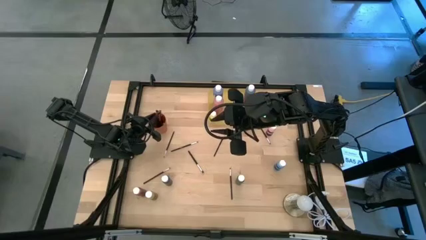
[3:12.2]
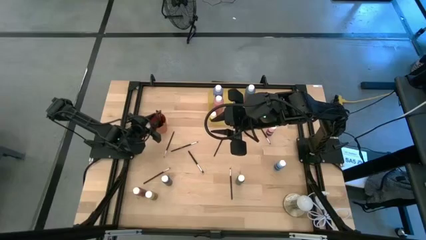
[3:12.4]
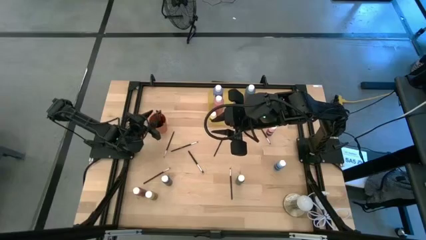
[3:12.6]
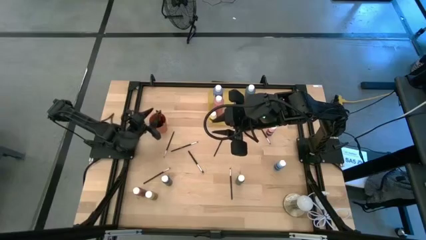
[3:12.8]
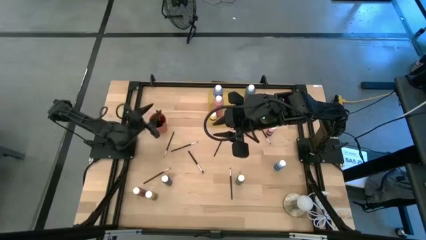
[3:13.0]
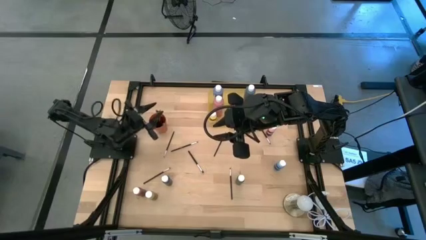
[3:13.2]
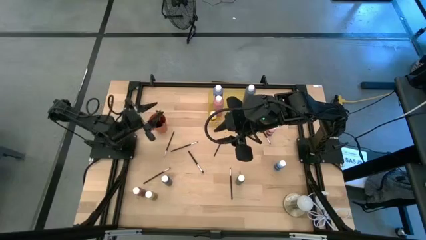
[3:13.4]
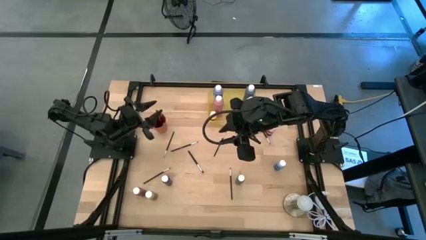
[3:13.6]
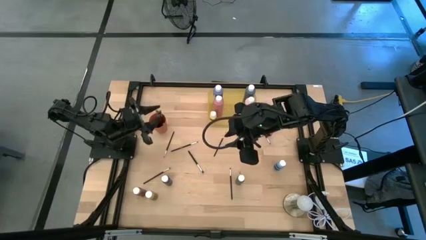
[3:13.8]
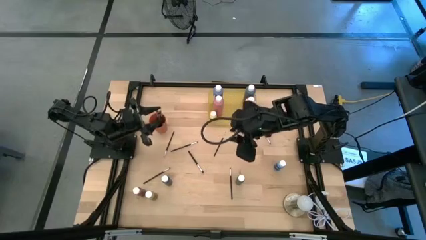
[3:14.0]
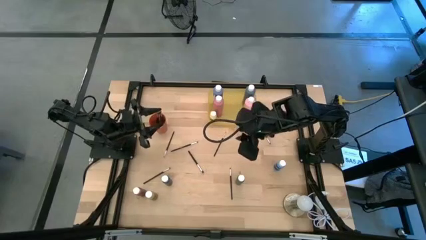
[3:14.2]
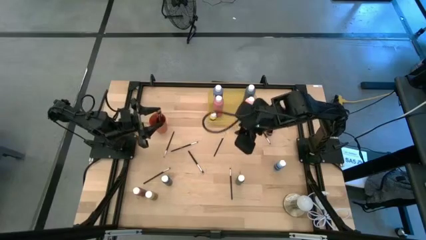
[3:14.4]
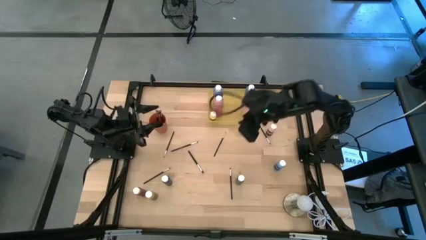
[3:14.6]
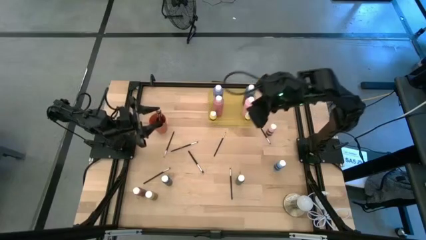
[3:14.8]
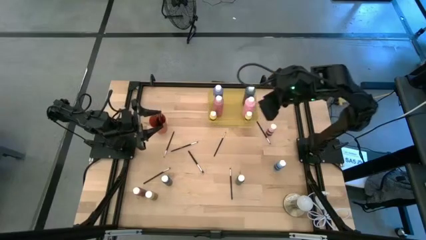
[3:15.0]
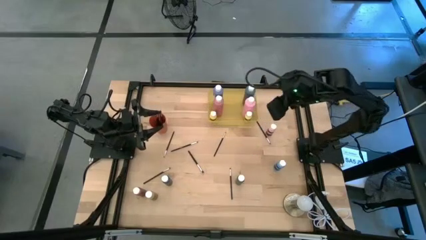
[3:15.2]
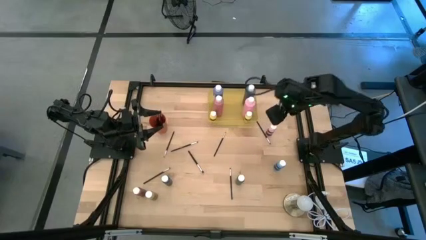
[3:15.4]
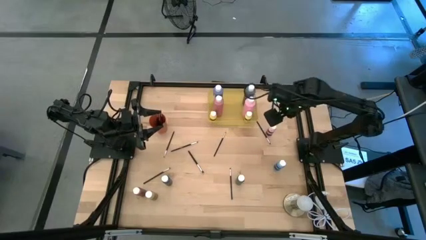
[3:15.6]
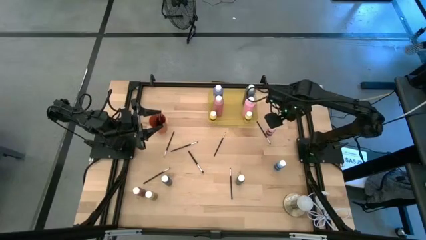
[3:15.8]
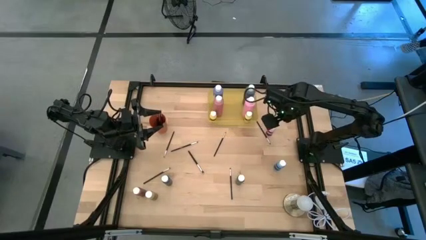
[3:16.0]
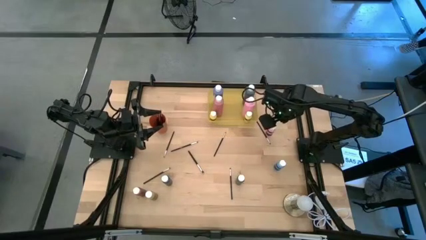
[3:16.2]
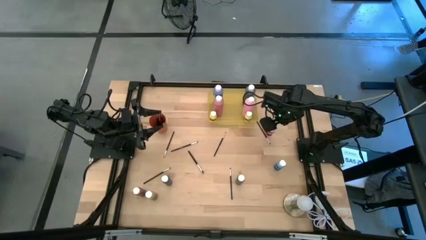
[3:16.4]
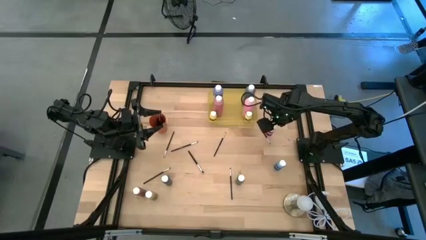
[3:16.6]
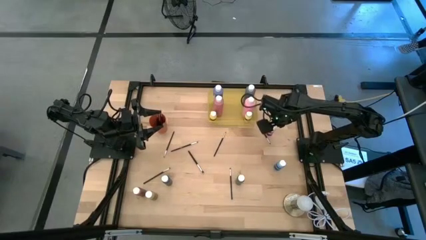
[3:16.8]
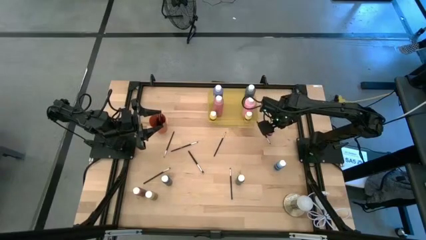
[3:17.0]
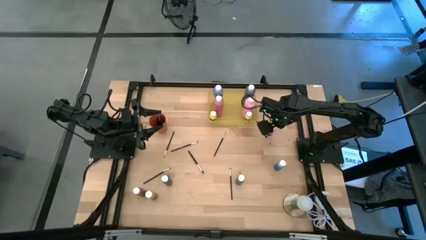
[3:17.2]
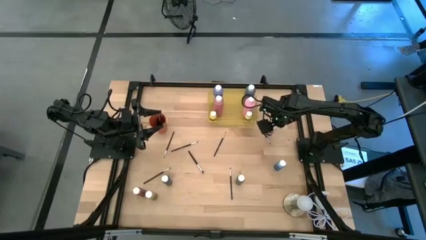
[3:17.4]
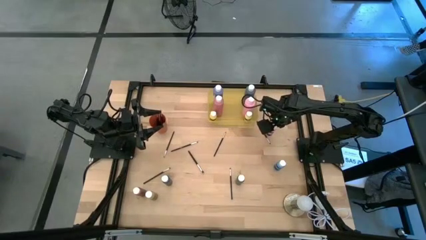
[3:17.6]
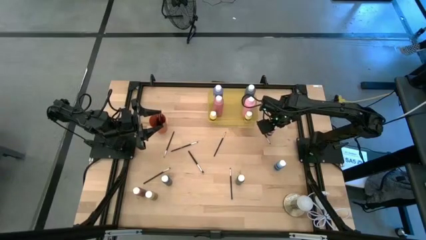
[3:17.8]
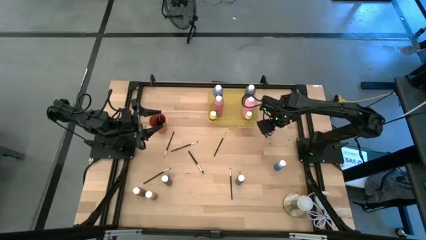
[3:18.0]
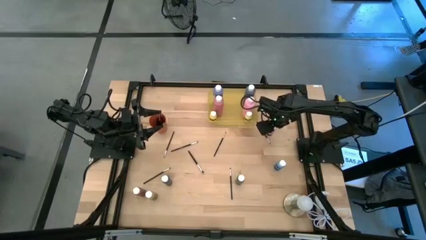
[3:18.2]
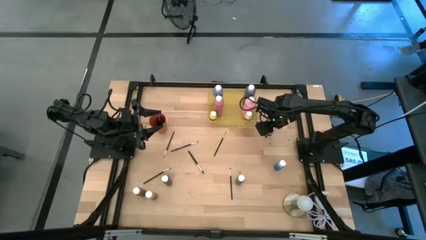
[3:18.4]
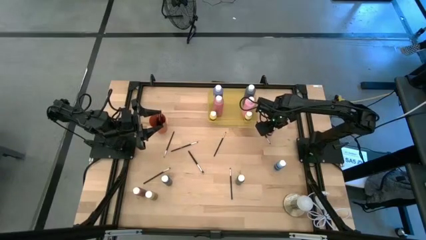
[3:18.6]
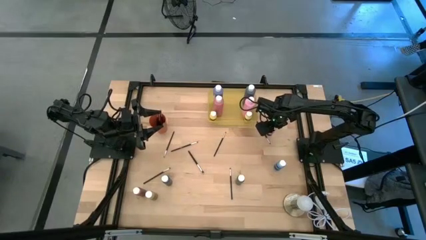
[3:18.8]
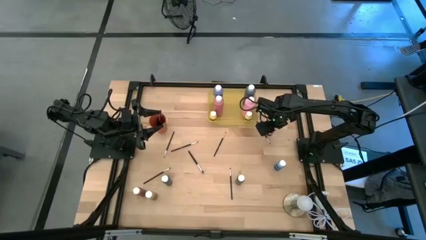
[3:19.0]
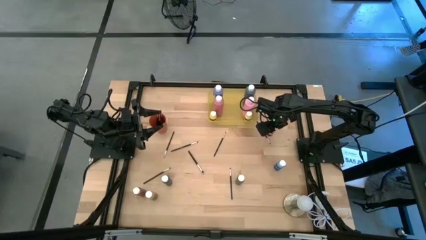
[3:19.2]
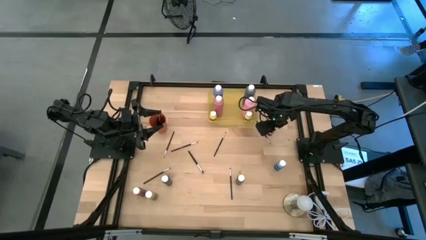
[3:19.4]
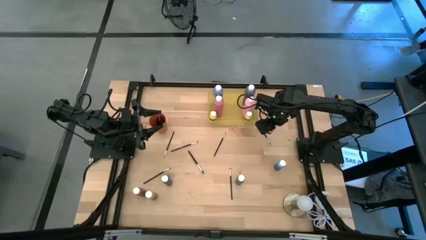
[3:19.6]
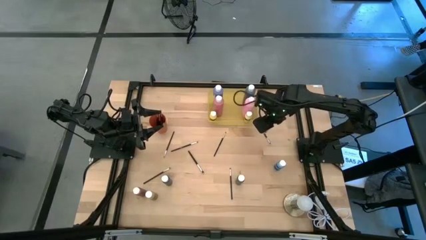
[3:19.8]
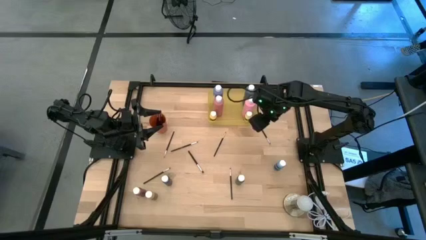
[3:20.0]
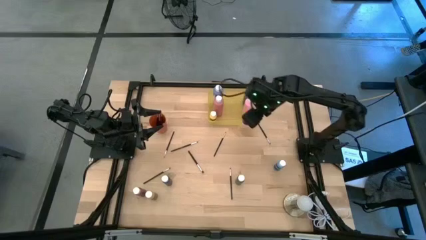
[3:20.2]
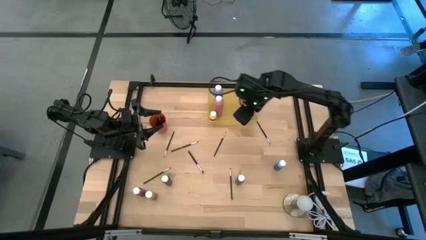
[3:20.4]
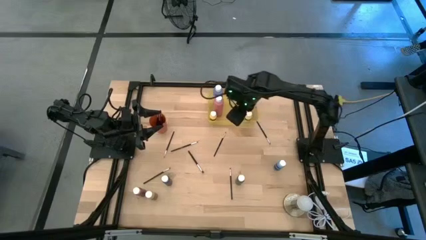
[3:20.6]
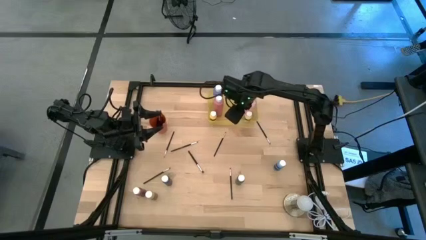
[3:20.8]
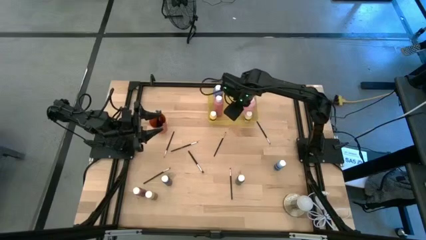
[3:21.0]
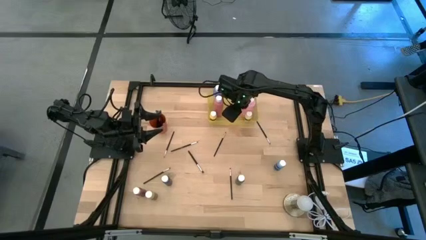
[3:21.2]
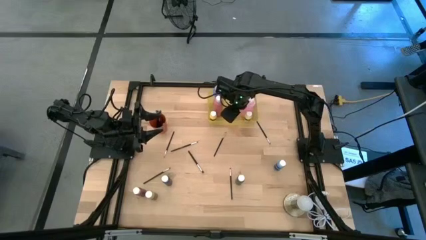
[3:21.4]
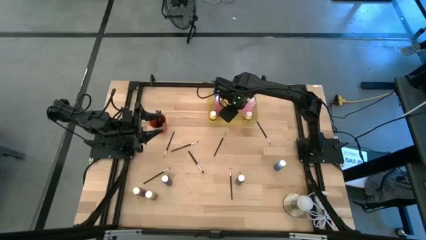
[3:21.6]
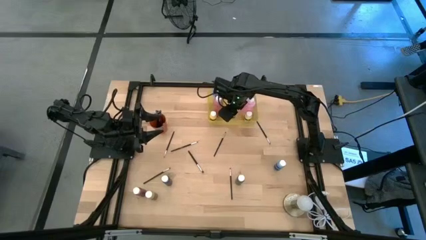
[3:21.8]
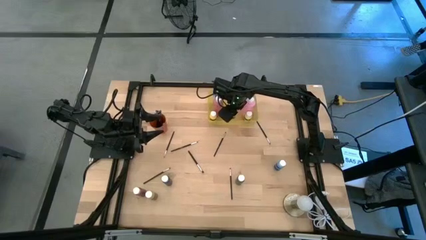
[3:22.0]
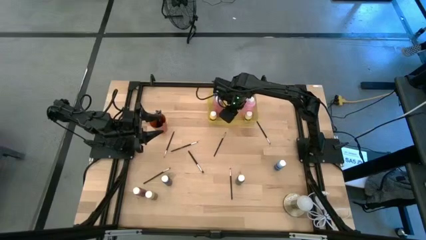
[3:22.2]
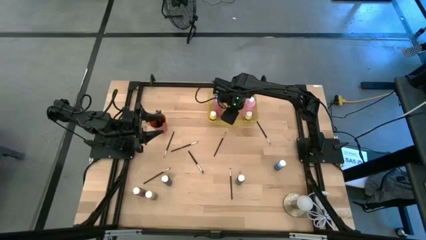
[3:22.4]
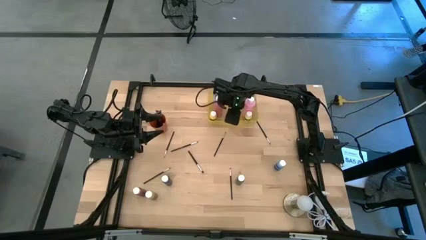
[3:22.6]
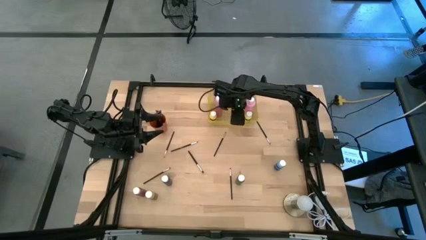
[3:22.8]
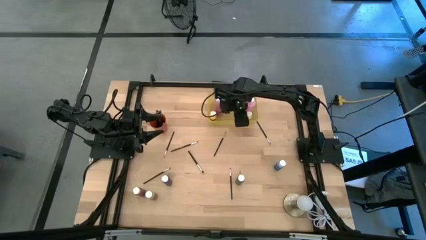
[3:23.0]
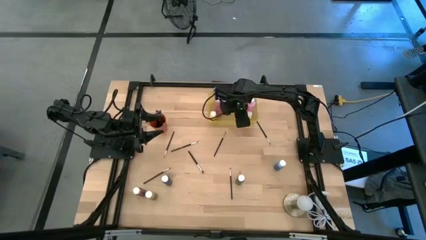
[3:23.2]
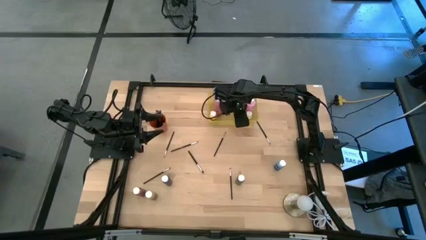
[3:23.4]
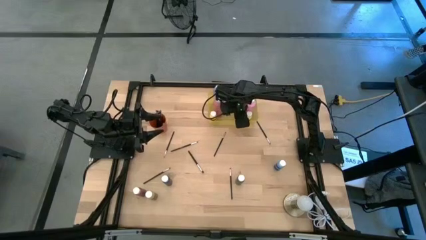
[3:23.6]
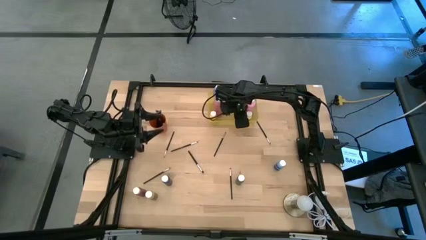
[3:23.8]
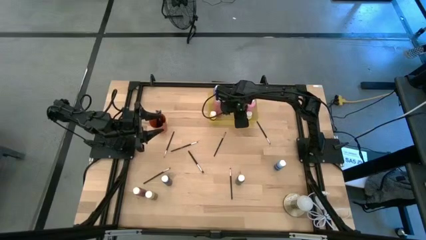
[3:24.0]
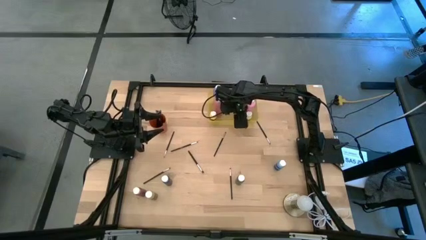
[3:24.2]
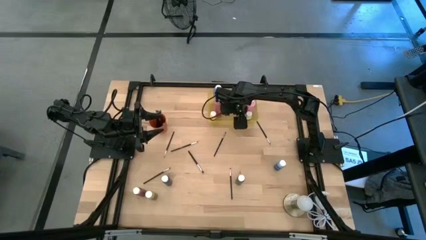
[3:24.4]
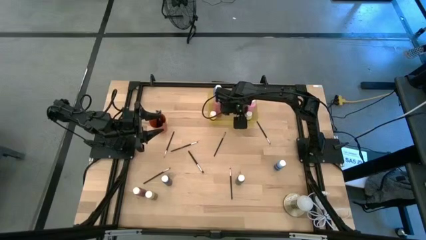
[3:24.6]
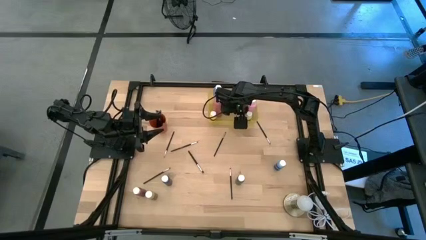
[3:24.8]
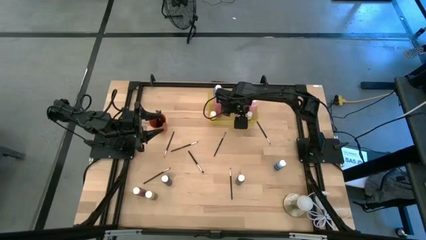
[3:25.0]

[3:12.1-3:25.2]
Task: Pick & Place Paint Supplies
Put the small light pink paint bottle into the yellow bin

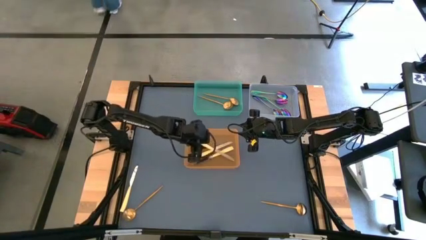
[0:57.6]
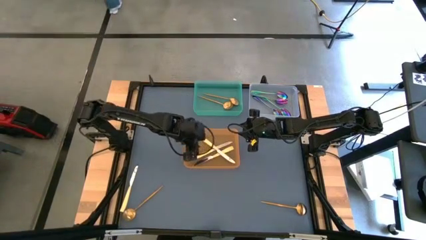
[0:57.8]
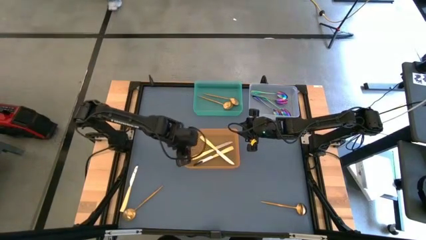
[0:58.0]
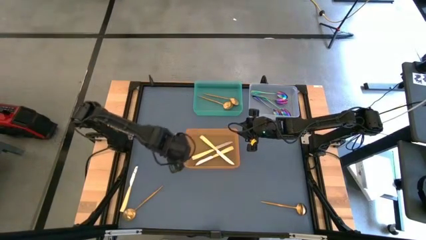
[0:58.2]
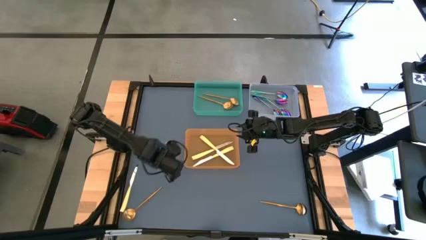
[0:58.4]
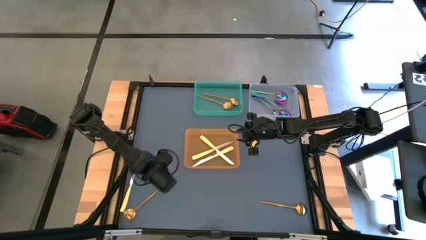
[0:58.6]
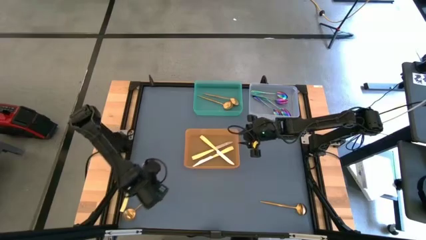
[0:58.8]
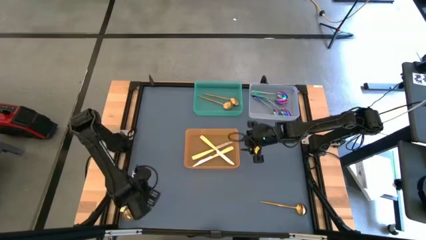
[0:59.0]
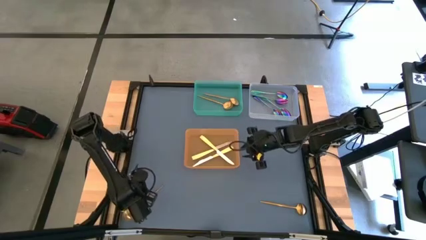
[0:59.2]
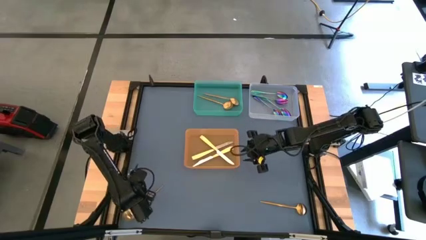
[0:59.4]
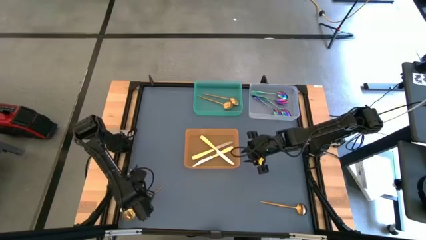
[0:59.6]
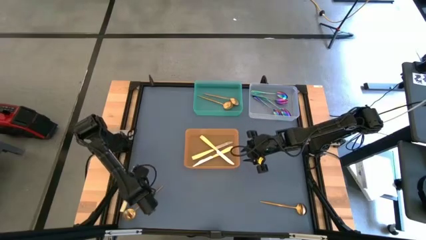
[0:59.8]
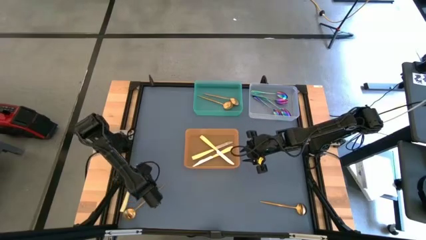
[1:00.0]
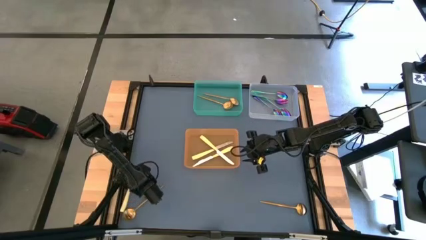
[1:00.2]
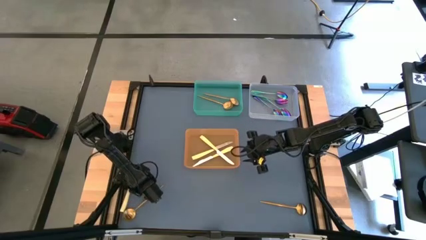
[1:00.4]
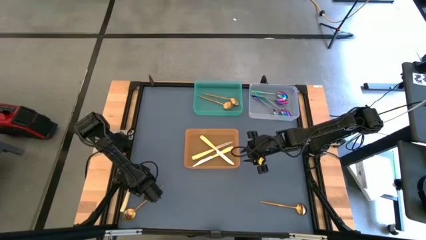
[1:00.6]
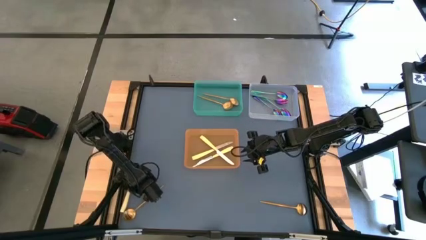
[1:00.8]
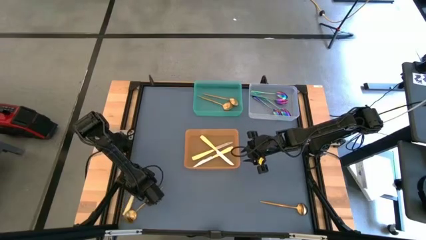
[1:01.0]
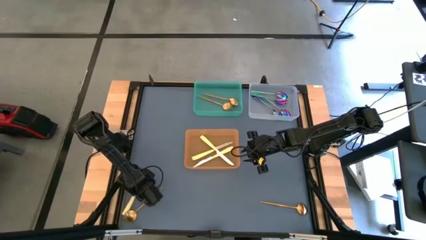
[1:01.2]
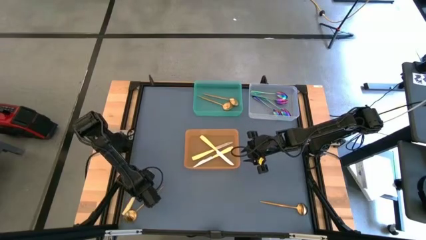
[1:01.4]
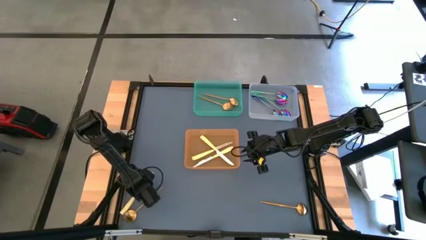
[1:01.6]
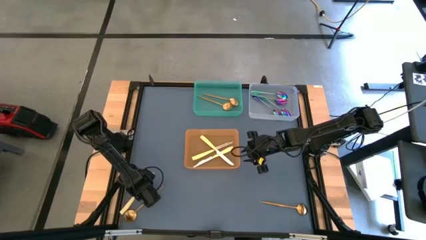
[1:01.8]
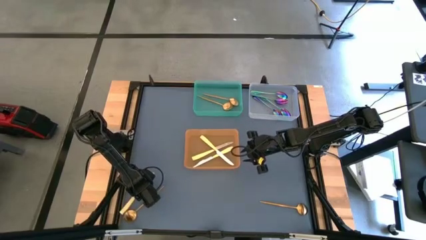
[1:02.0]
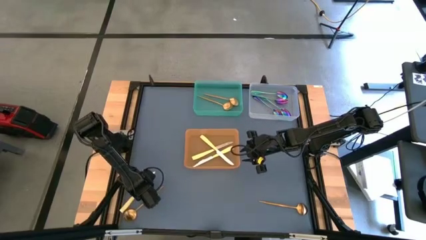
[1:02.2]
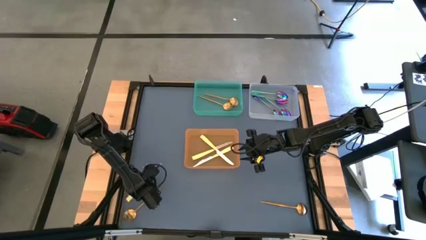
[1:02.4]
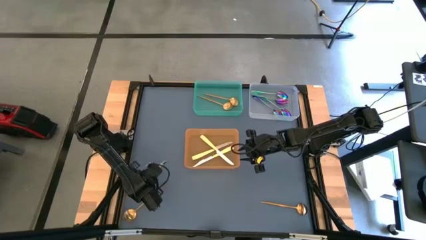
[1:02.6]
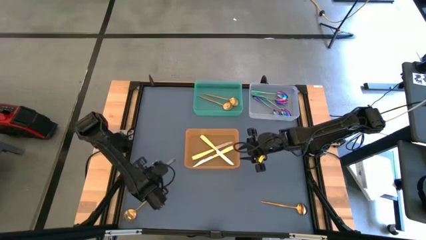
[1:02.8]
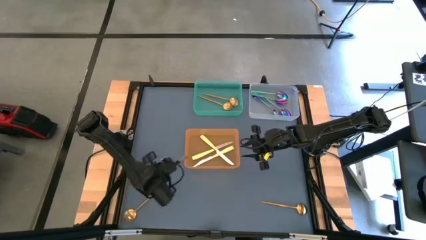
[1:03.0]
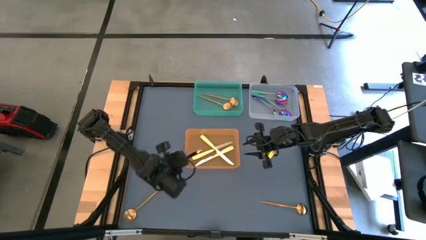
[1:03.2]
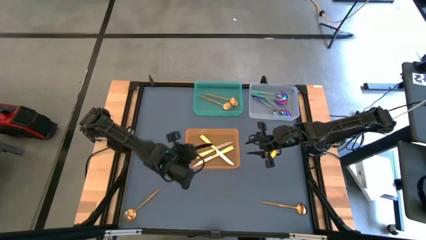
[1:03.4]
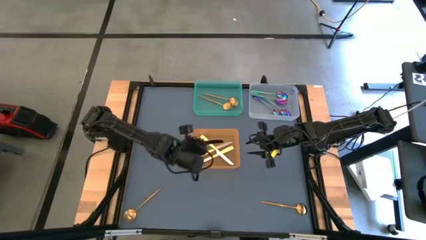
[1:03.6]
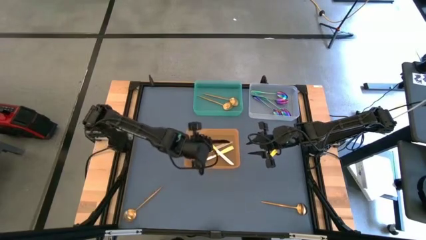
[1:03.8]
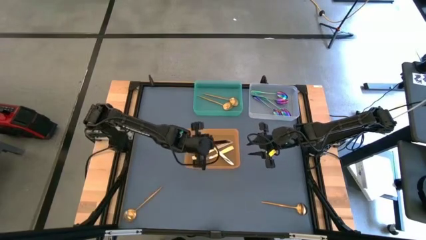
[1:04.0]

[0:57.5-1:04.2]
Task: Sort silverware by color (type)
Put the yellow knife into the orange bin
